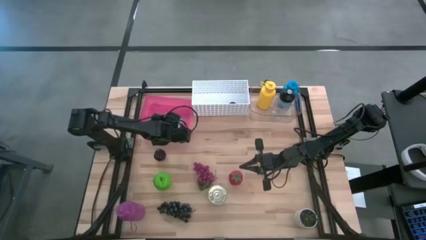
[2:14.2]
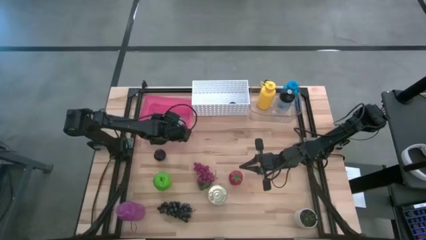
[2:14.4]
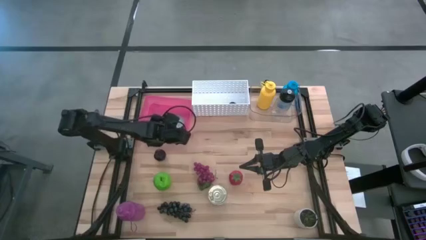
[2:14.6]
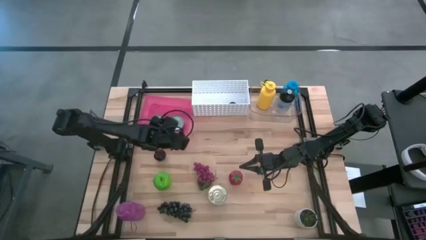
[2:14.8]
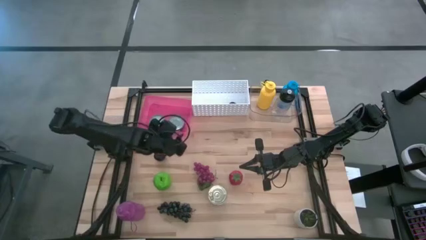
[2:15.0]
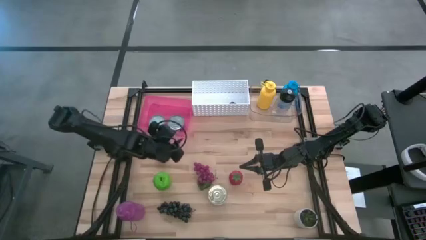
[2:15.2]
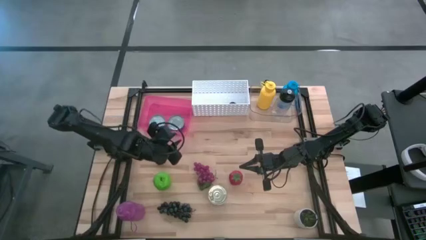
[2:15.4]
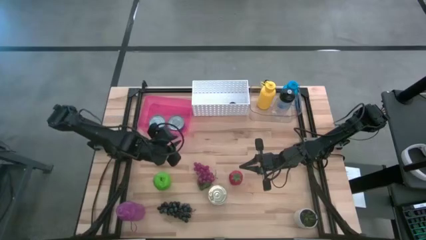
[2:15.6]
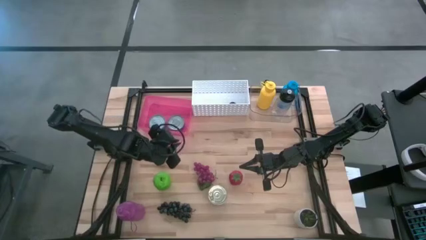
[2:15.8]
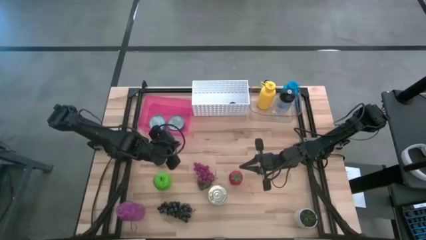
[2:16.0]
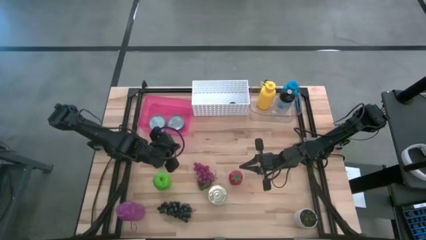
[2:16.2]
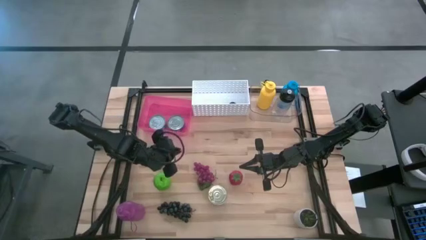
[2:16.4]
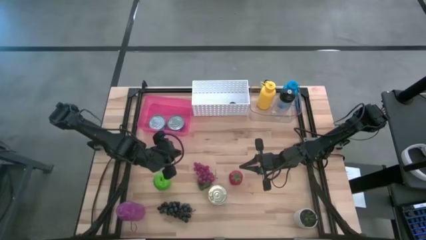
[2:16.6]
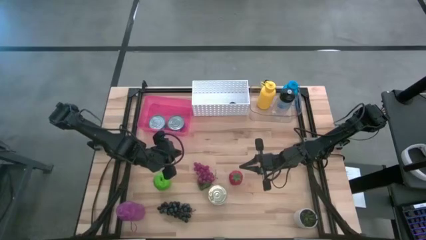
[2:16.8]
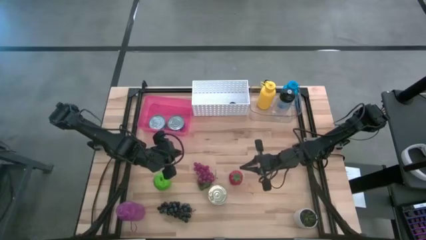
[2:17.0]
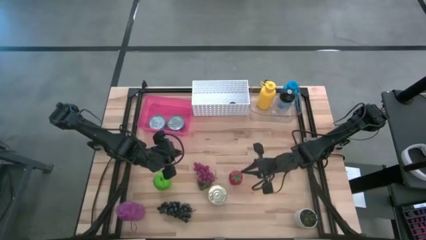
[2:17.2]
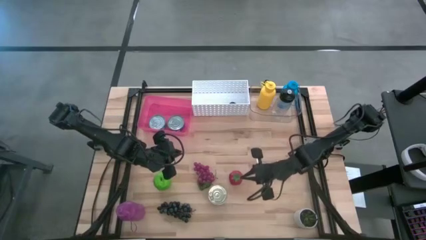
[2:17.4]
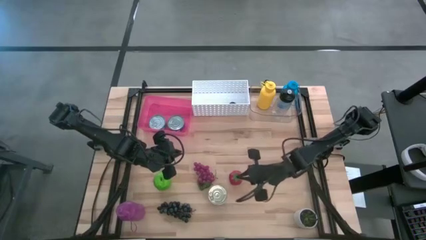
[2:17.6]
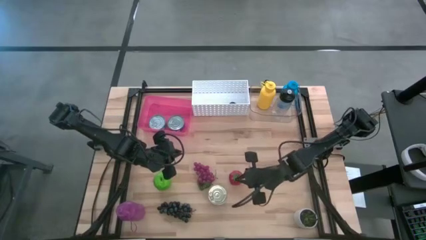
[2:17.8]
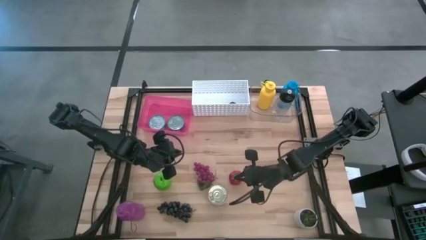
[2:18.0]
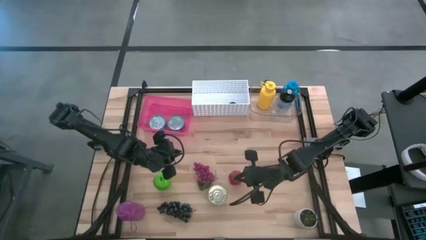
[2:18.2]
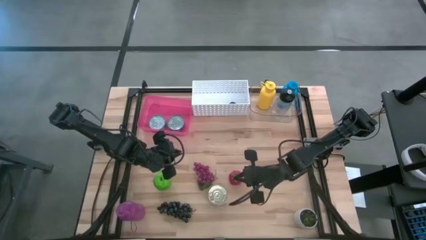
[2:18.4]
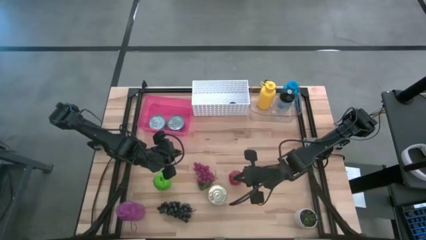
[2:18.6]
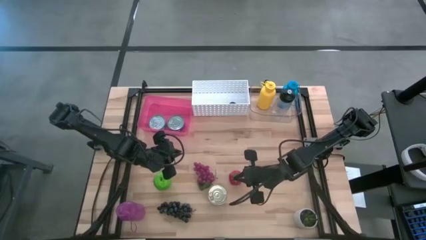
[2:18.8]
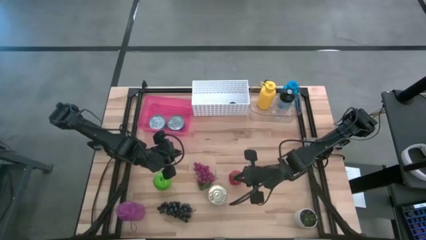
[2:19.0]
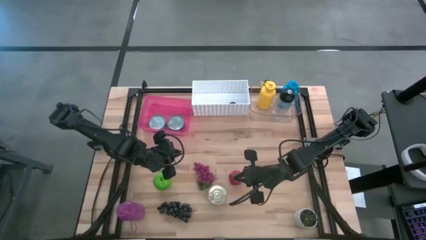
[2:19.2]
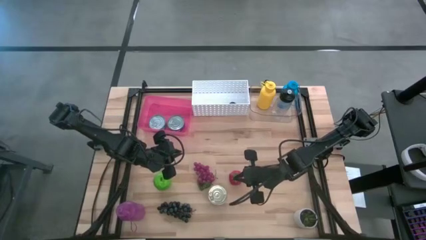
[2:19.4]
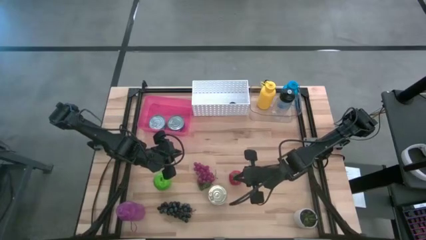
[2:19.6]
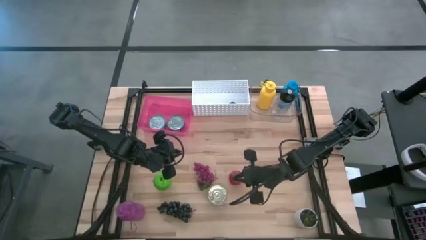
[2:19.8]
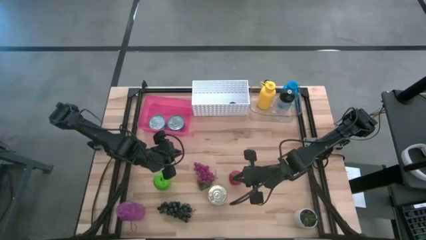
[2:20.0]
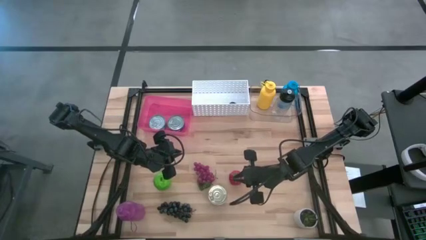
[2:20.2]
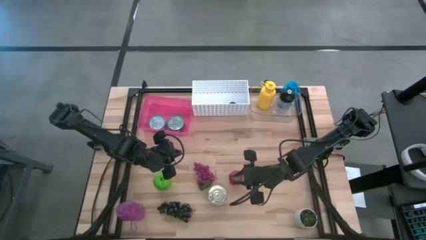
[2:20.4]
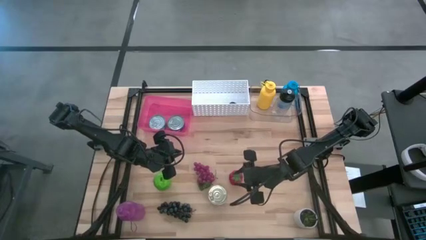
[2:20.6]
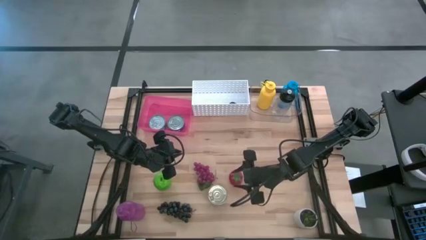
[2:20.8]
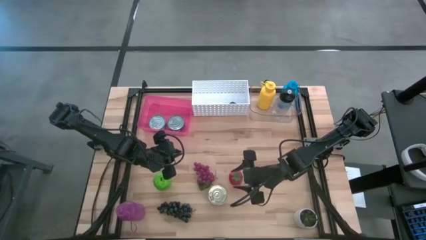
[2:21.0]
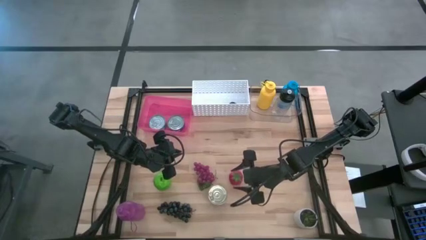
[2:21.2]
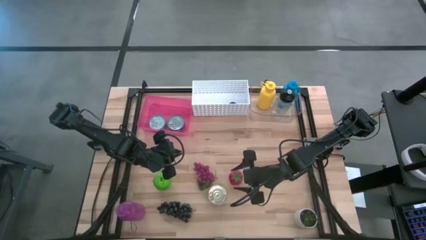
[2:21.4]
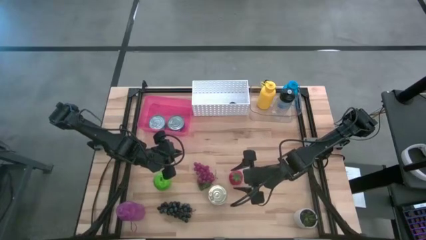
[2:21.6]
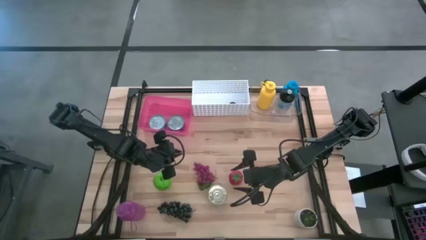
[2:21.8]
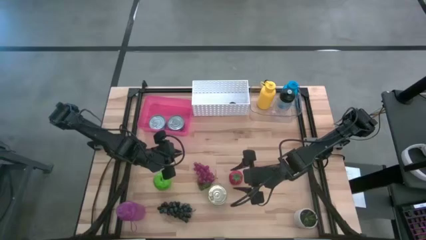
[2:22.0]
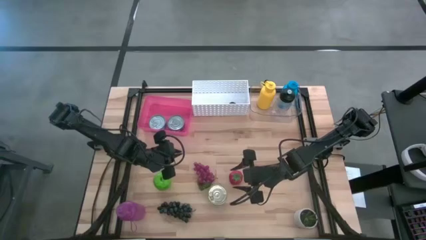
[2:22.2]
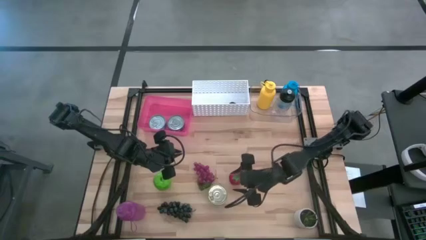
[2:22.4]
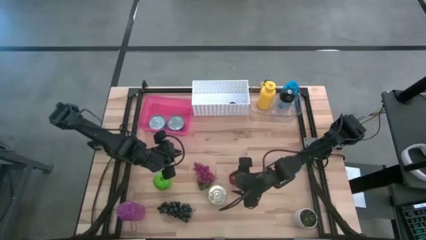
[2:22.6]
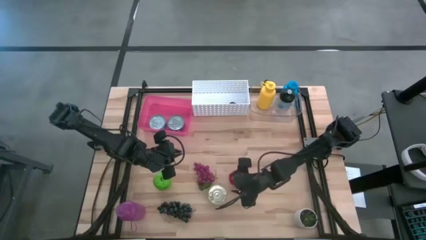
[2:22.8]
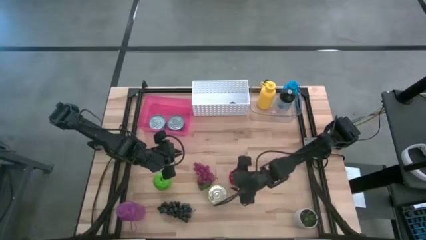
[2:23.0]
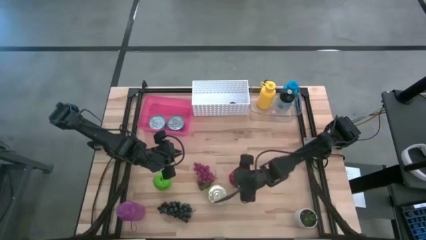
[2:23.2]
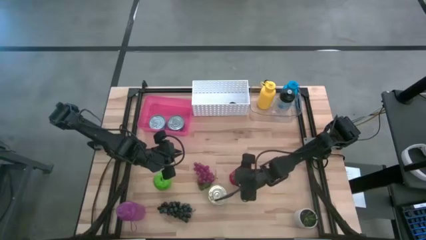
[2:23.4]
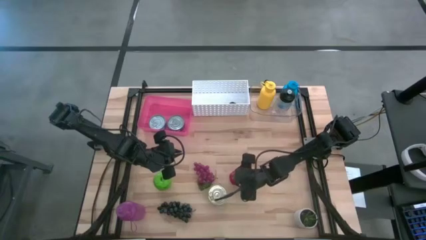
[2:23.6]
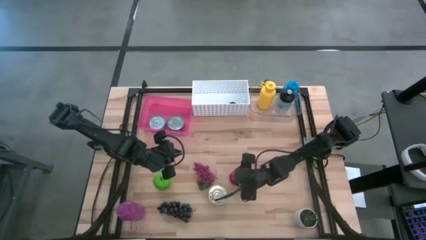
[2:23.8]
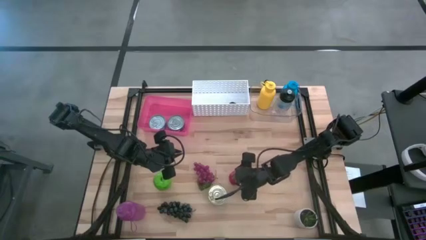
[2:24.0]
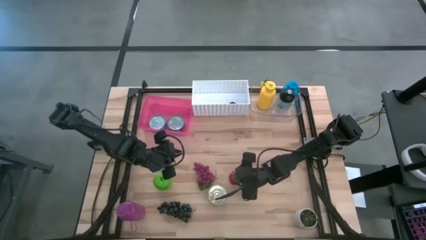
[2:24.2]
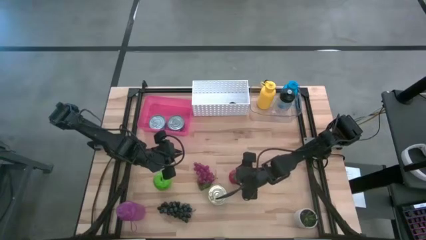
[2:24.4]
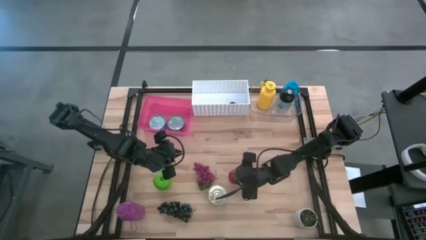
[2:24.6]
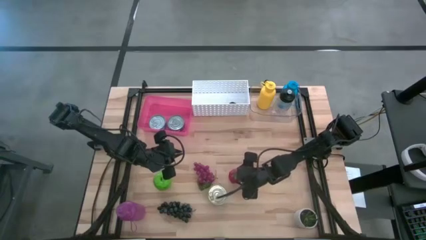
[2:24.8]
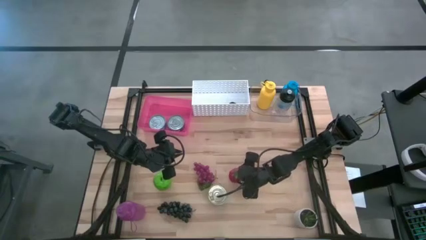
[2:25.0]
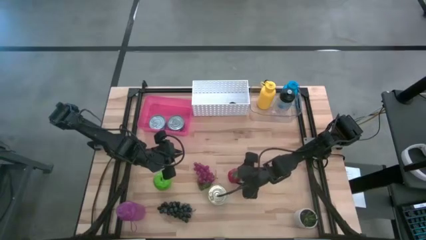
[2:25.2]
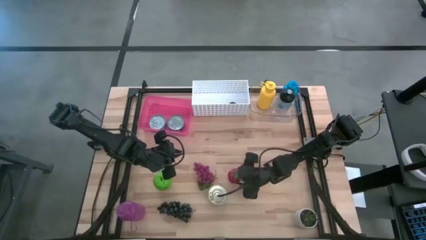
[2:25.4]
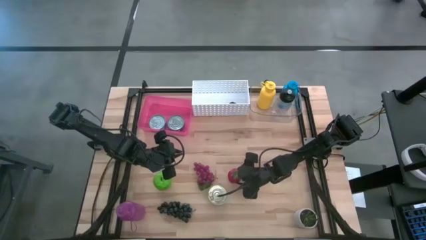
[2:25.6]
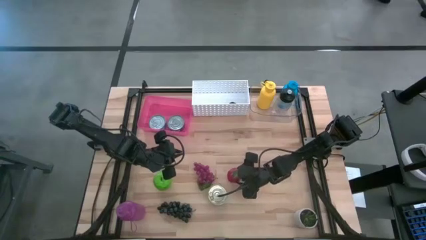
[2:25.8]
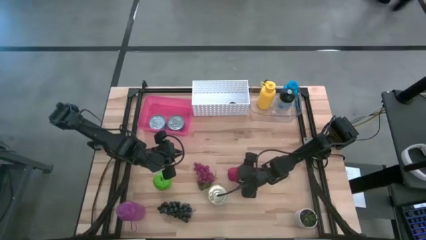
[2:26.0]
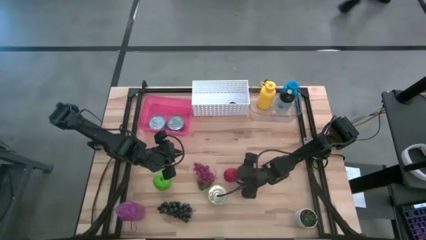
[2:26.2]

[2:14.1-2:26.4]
Task: Pick & Place Food Item
Put the red tomato into the white bin

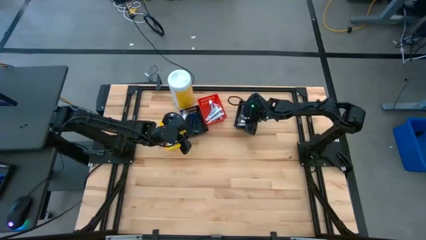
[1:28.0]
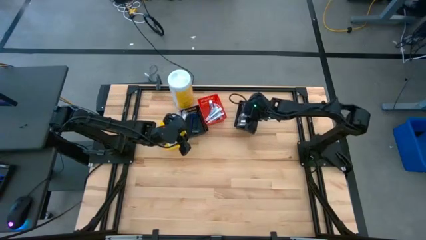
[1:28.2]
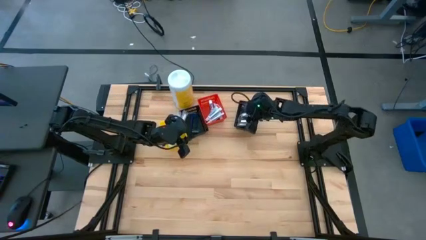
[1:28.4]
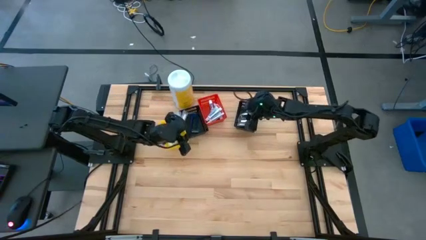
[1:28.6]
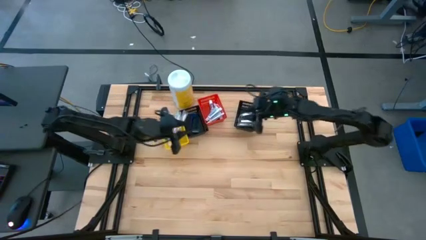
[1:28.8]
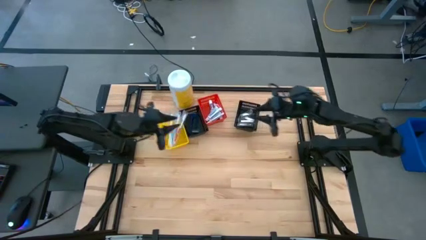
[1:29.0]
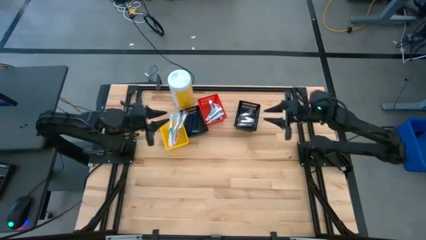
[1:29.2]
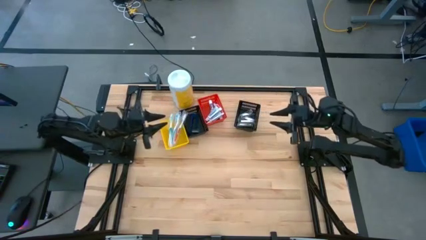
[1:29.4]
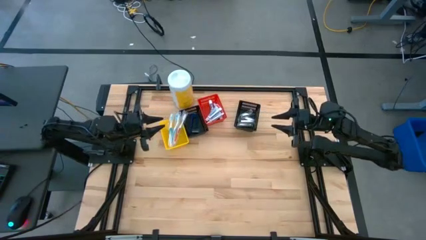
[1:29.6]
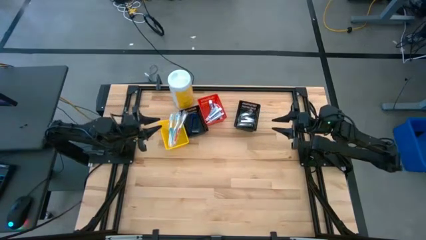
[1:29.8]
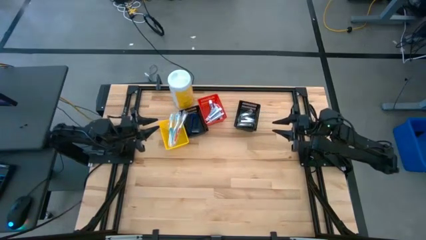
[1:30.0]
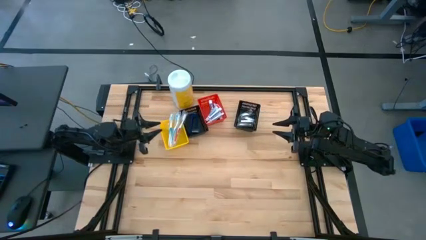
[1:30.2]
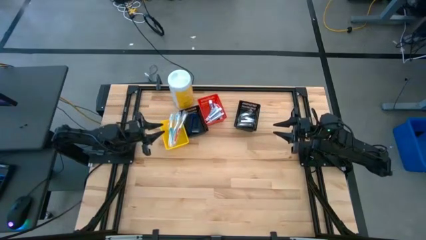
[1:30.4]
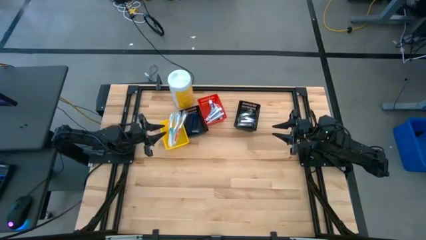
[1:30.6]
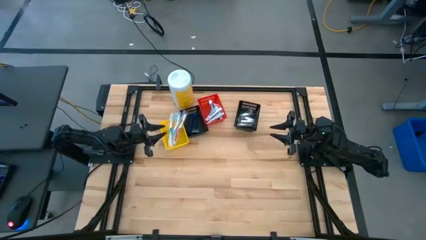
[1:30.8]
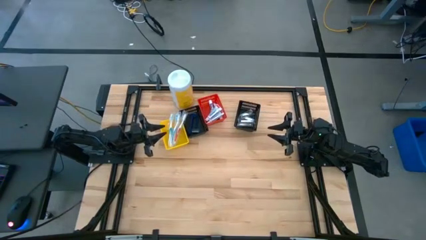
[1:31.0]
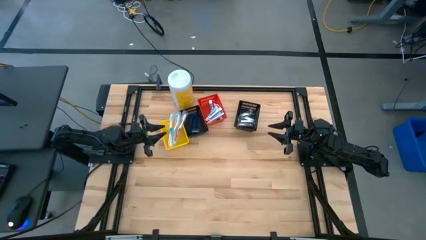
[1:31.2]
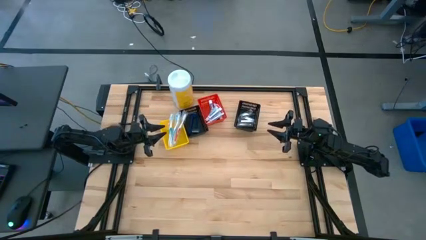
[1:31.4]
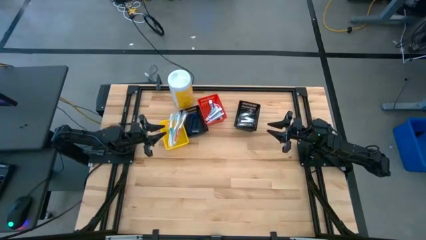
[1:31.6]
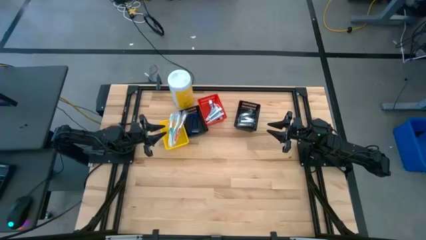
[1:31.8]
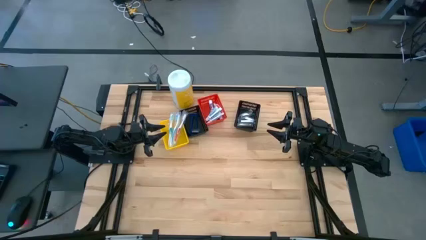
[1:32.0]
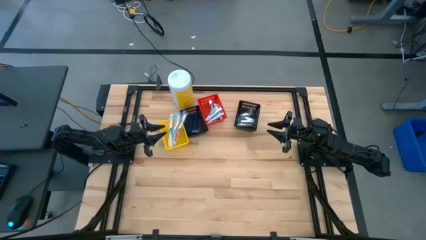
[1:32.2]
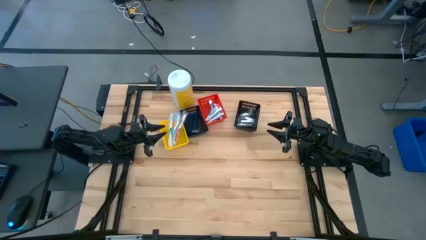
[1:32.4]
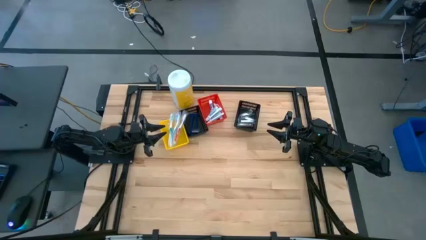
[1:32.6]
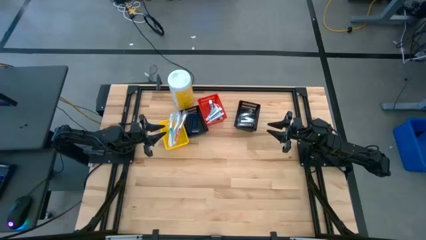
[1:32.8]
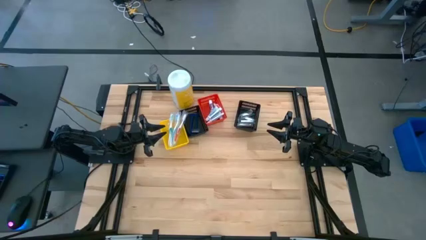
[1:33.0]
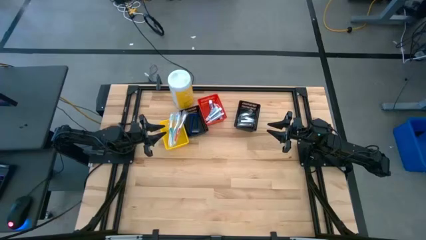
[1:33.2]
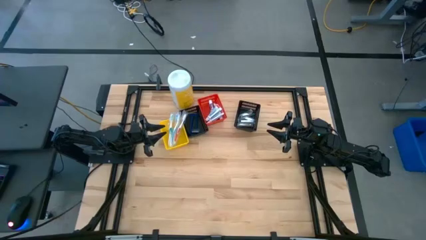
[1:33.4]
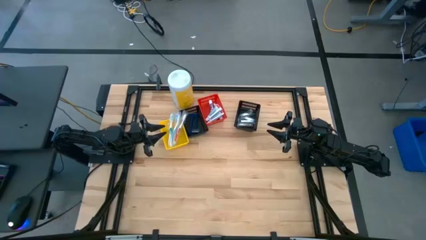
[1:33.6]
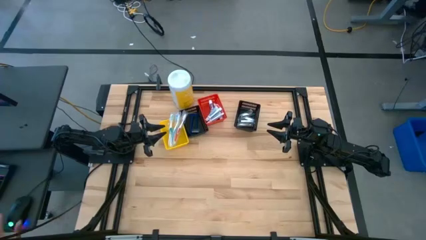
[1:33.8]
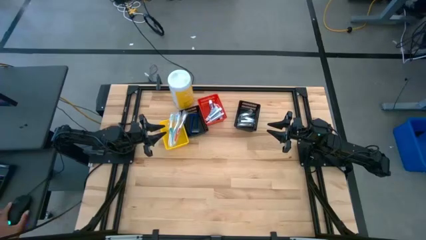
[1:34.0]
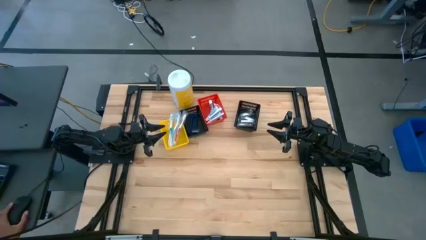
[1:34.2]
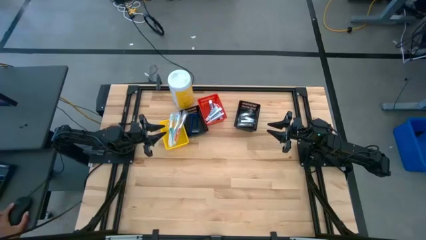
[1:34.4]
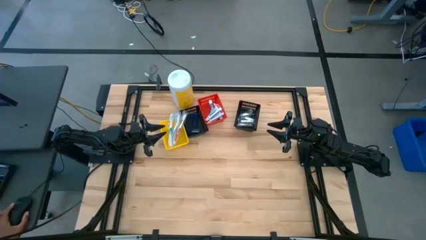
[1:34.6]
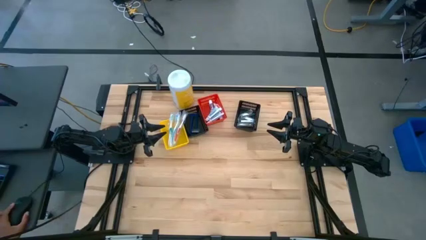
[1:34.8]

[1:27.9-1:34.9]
Task: Pick & Place Travel size toiletries
Return to Home Position
